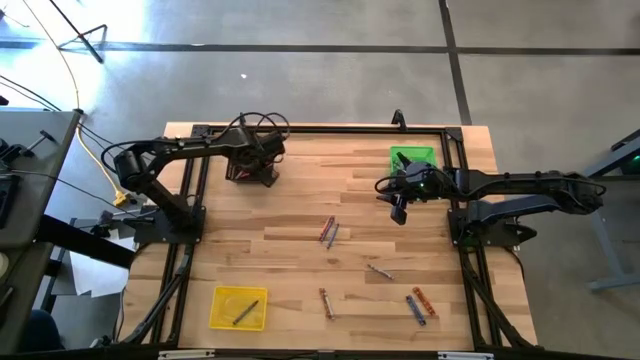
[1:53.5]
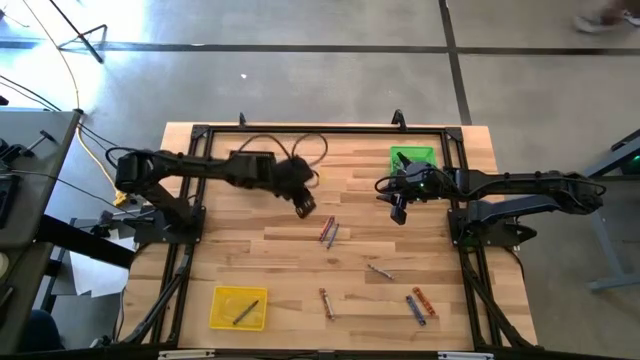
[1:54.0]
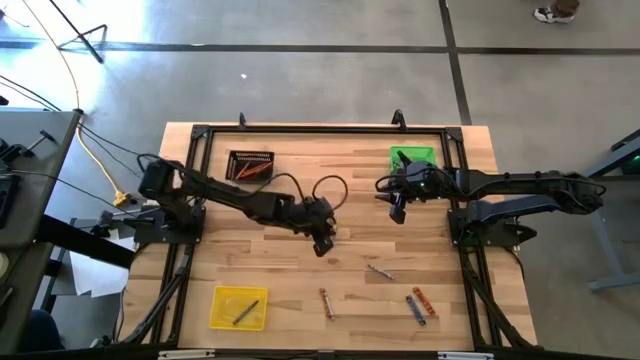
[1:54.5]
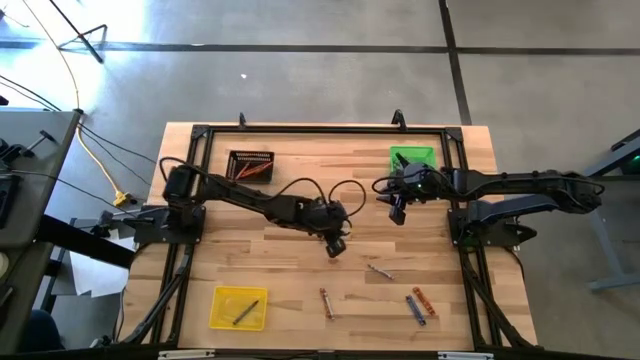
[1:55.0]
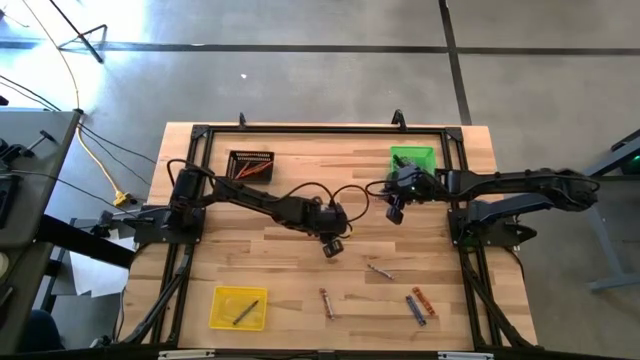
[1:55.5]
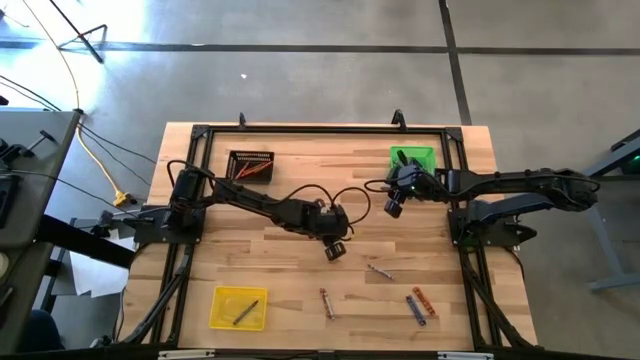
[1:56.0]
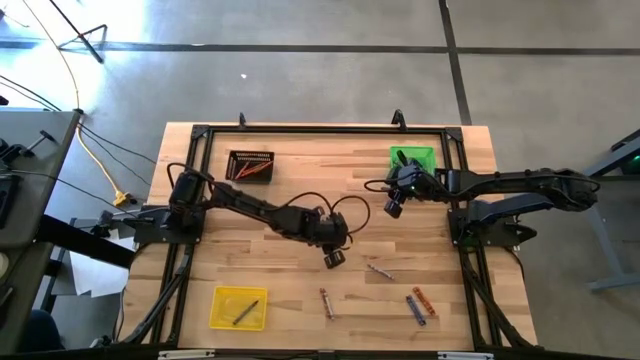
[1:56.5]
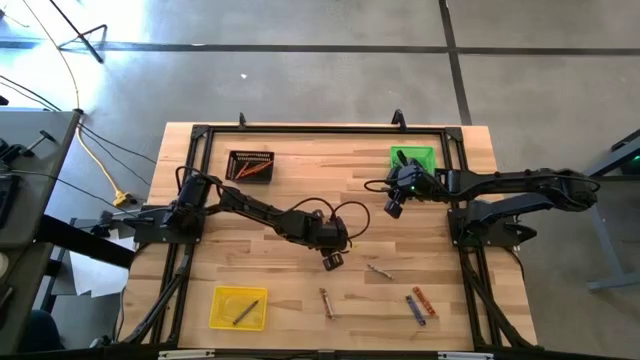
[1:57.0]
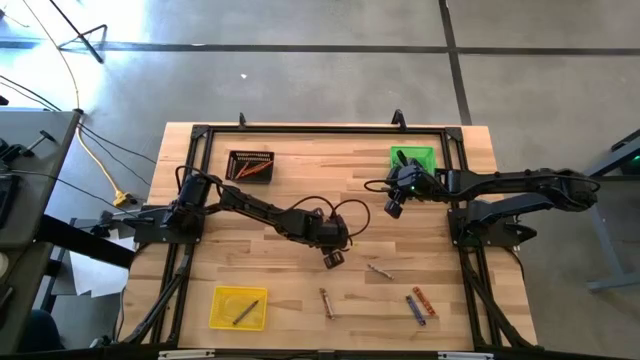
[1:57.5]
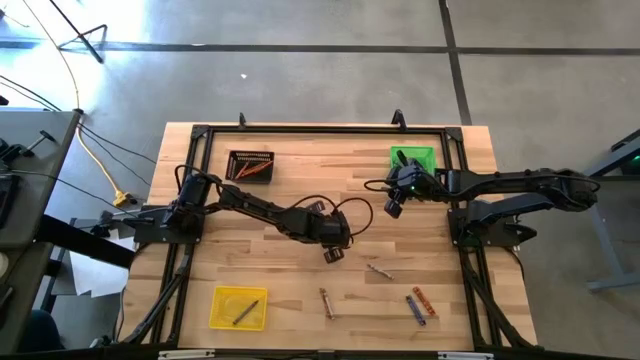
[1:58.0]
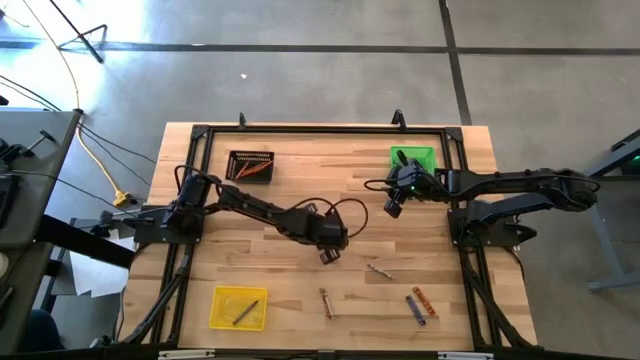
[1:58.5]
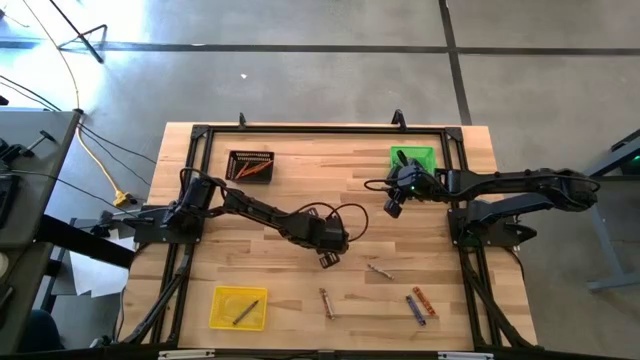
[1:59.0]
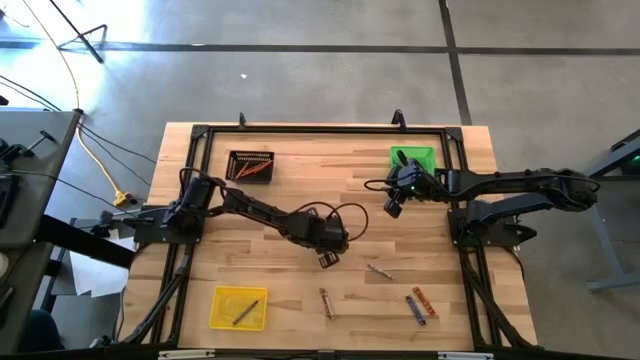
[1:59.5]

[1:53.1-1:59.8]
Task: Sort crayons
Put the blue crayon into the yellow bin

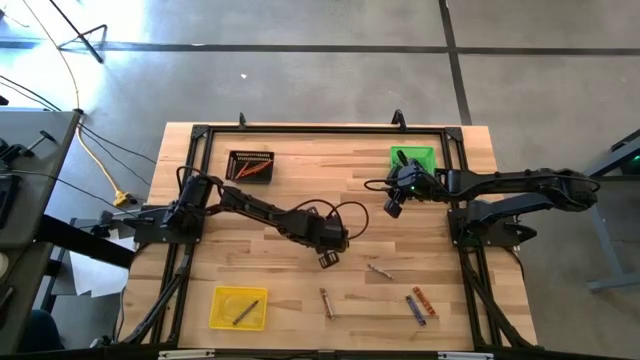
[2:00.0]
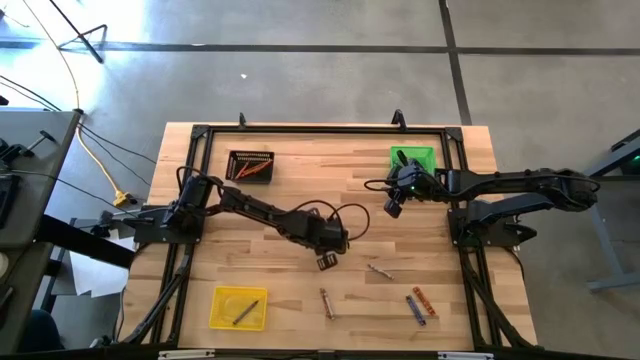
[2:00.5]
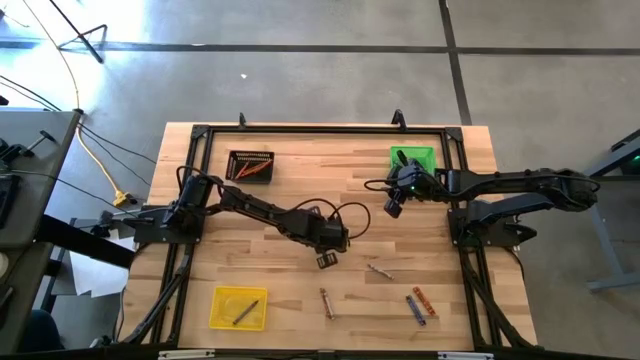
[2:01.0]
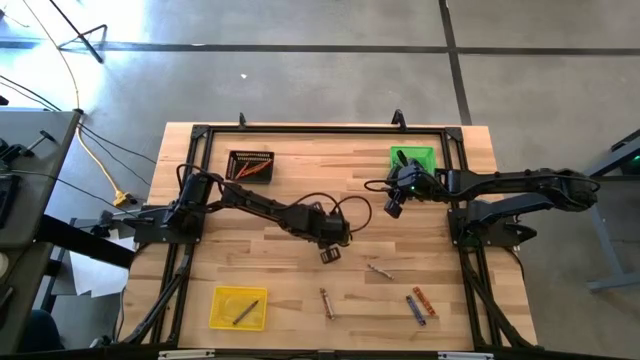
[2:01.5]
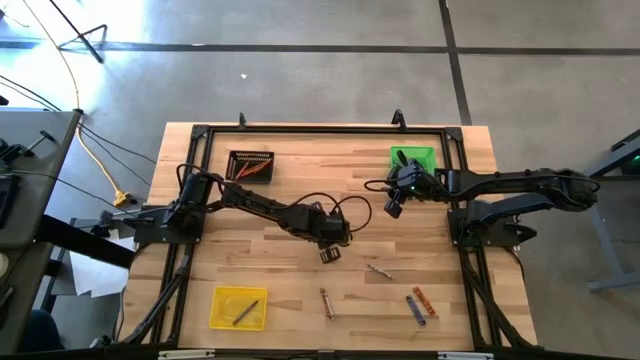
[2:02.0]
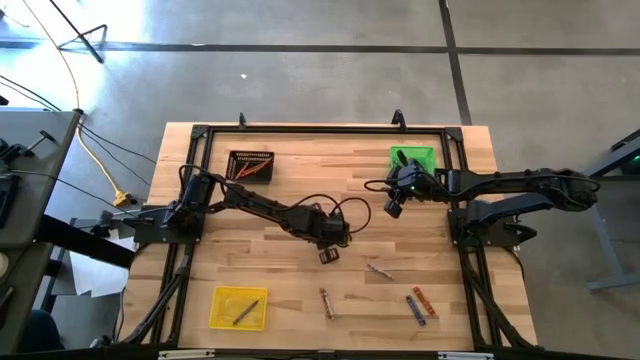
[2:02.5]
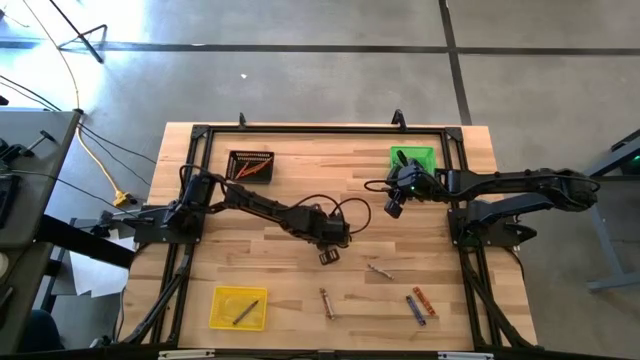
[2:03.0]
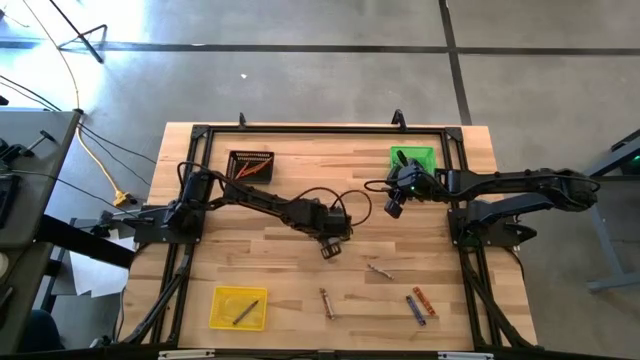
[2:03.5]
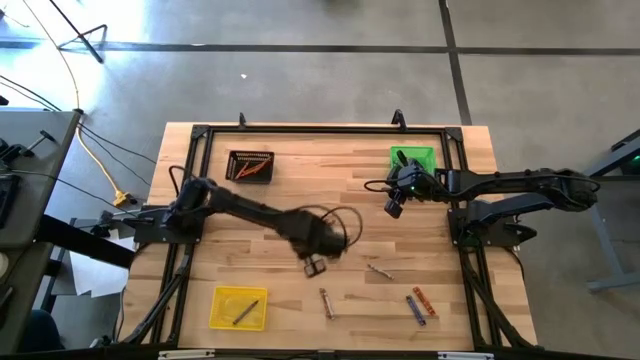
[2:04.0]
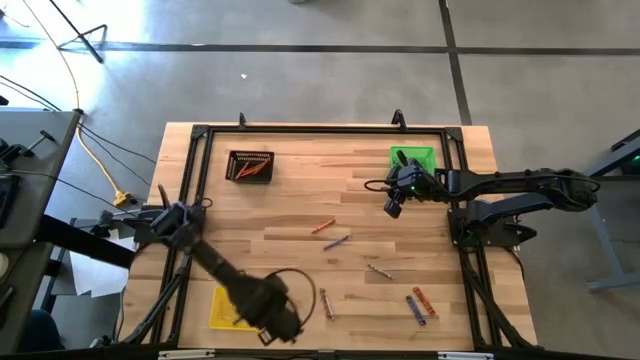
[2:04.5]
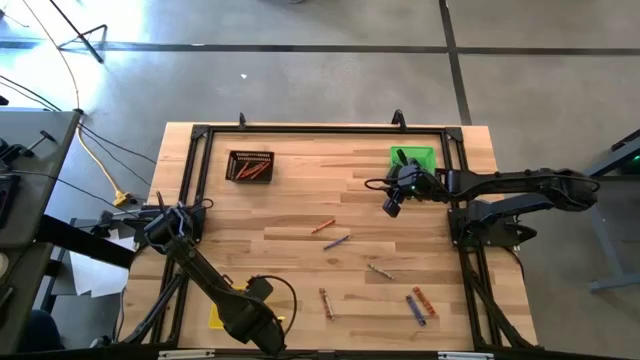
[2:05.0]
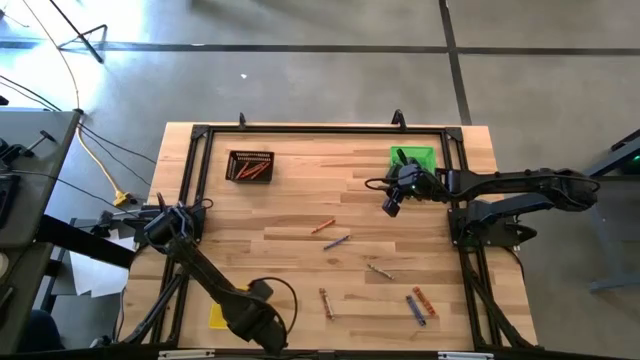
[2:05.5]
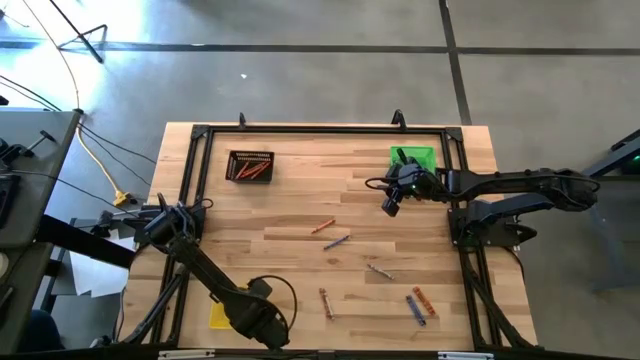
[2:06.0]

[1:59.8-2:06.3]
Put the blue crayon into the yellow bin

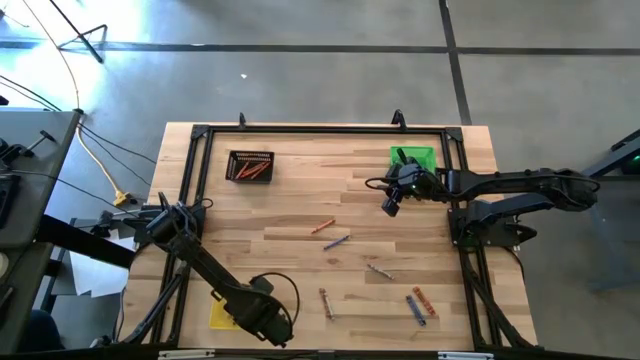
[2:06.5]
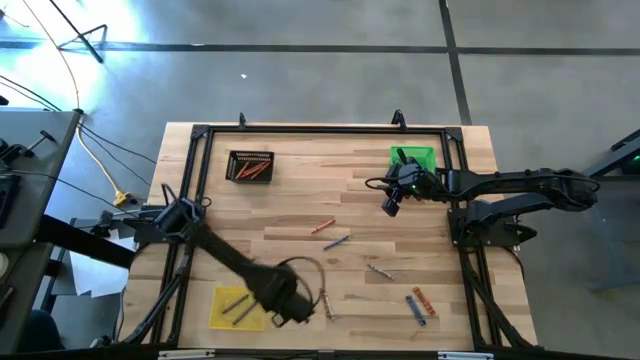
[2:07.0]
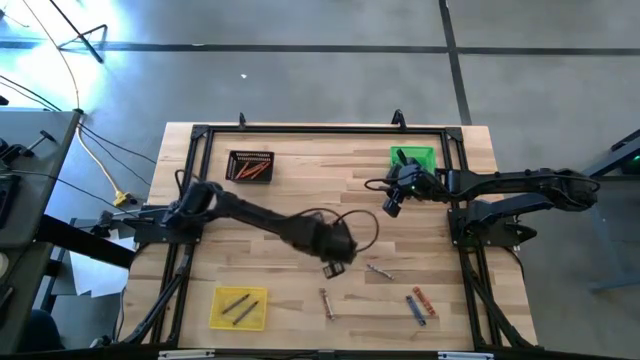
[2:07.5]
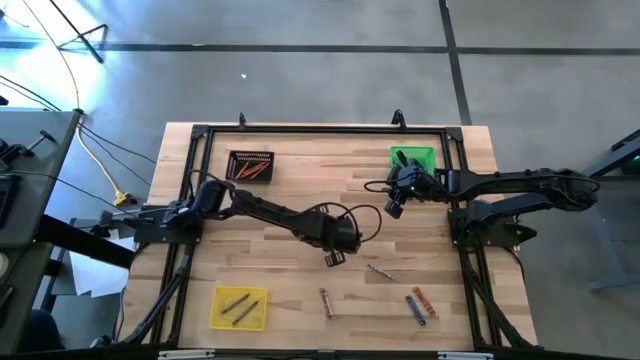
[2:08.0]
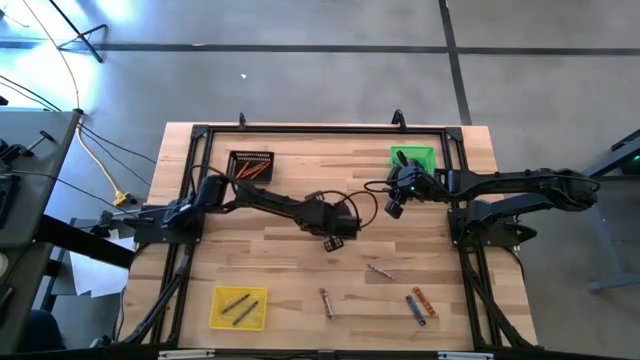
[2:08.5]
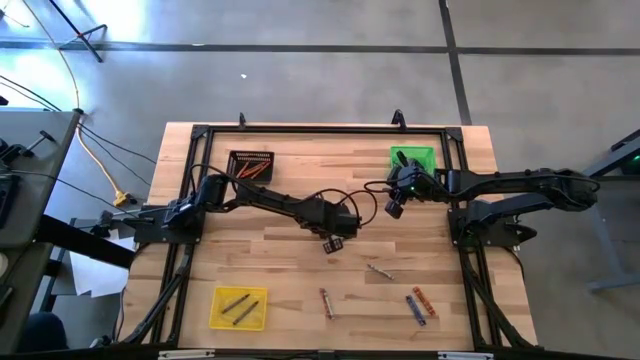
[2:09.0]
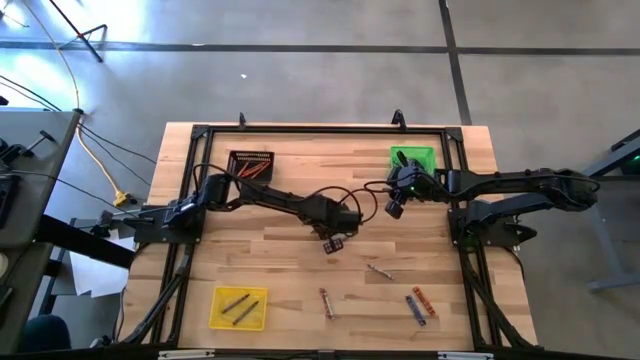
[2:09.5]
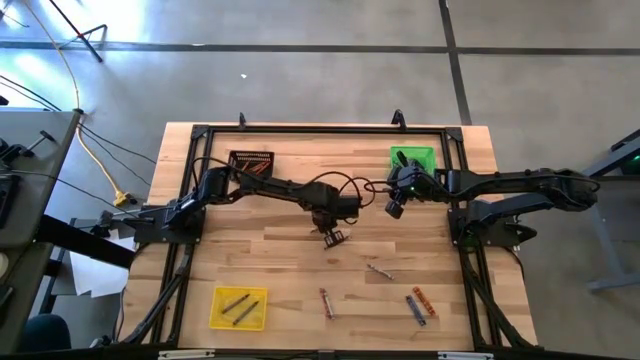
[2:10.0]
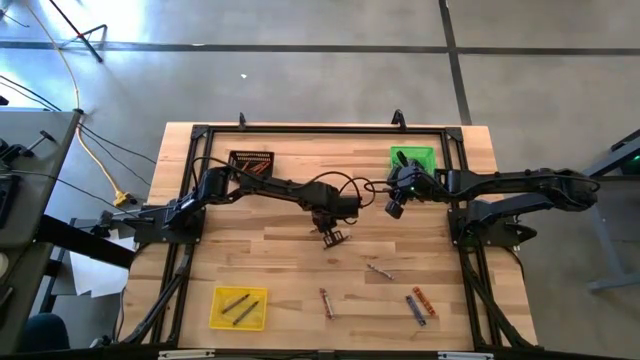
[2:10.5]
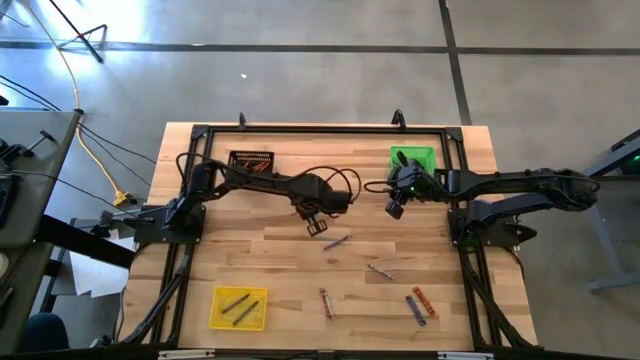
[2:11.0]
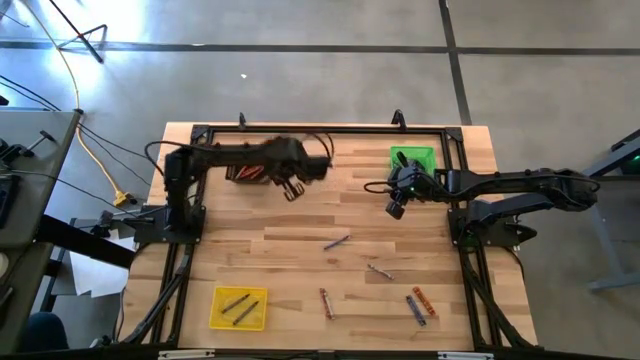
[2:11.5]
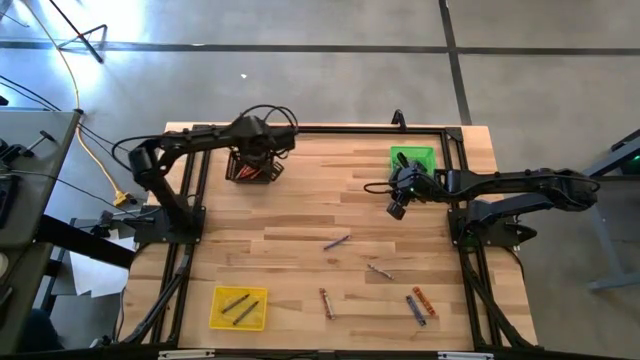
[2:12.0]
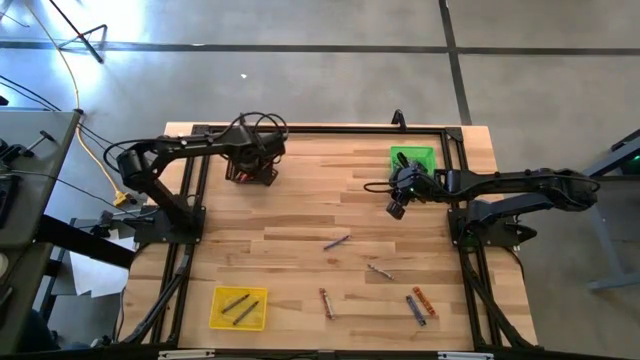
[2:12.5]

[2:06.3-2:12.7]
Put the orange crayon into the black bin

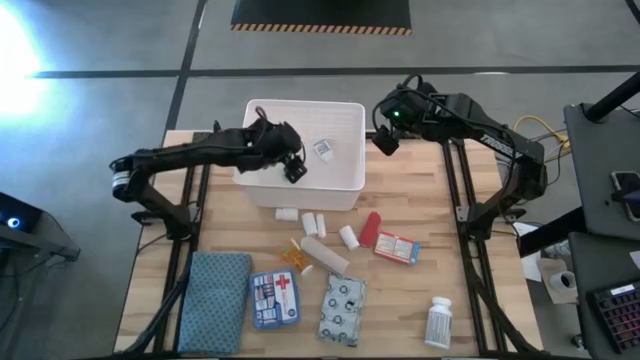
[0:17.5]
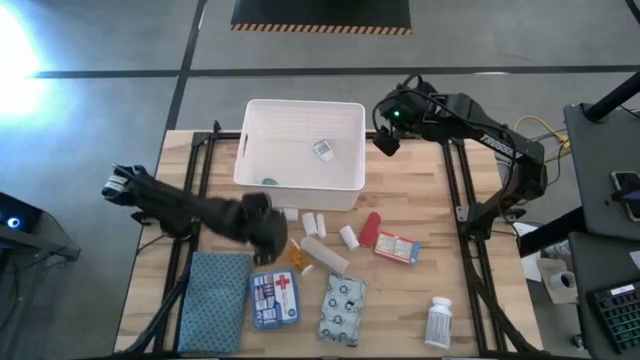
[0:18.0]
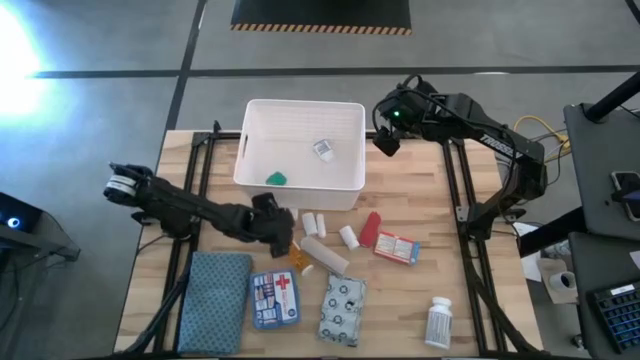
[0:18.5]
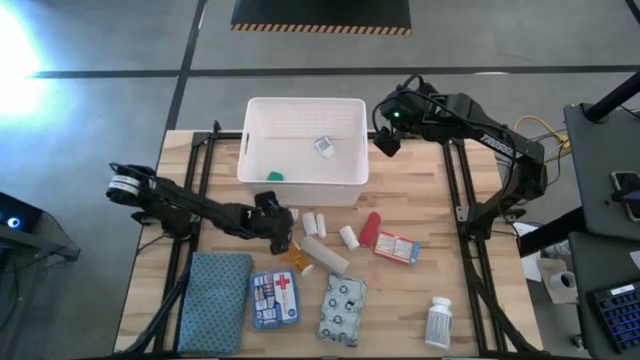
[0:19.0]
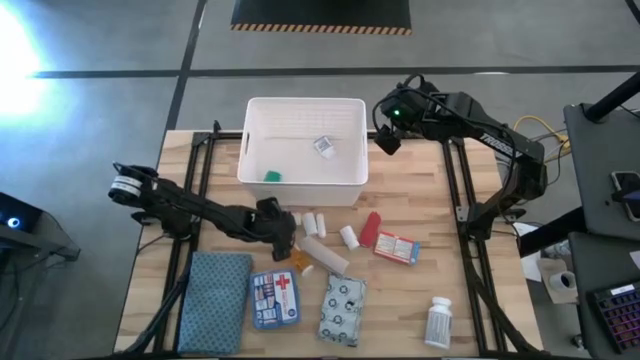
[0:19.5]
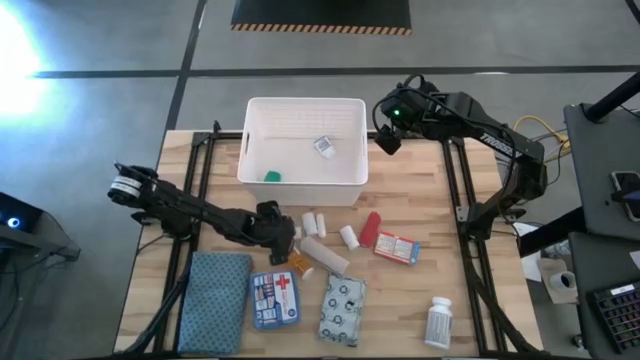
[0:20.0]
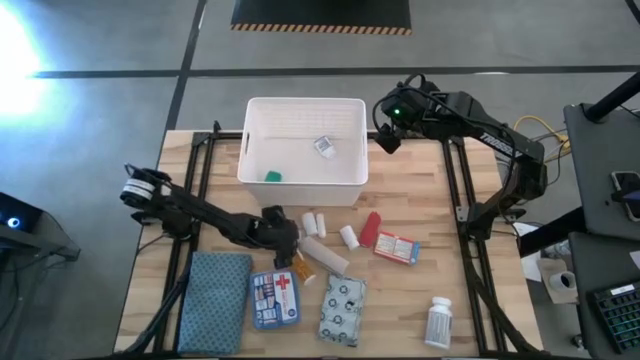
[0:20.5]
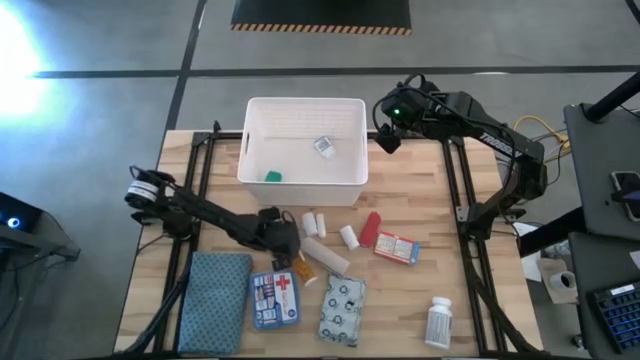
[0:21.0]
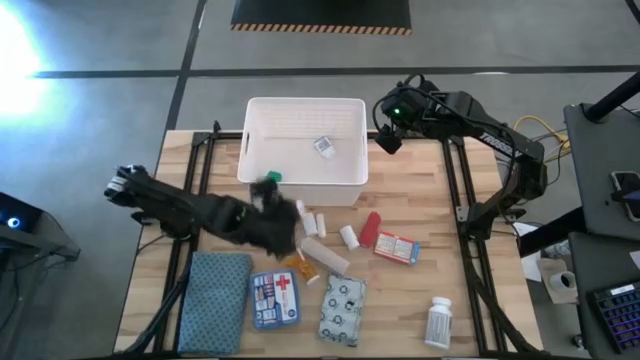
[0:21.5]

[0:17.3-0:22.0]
Task: Pick & place medical supplies in basket/bin
Put the left white pill bottle into the white bin
